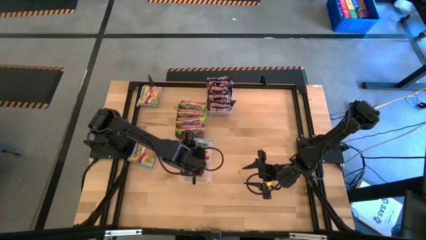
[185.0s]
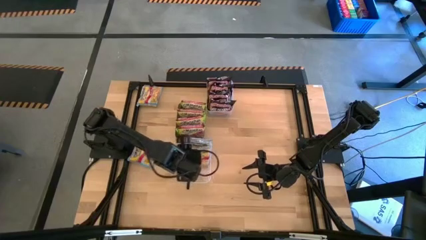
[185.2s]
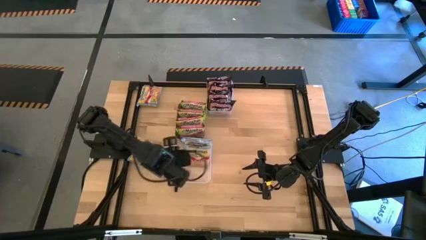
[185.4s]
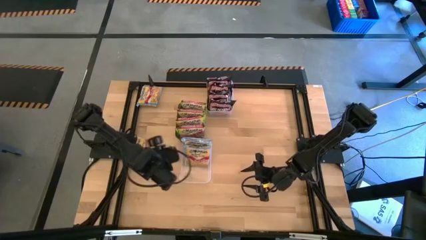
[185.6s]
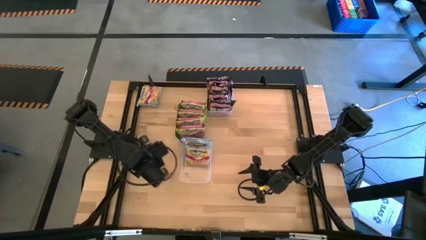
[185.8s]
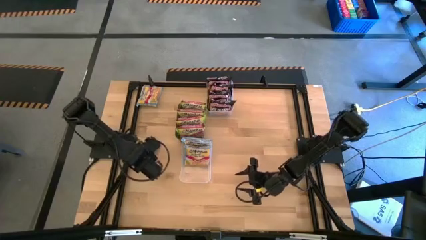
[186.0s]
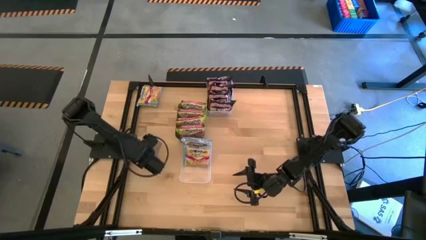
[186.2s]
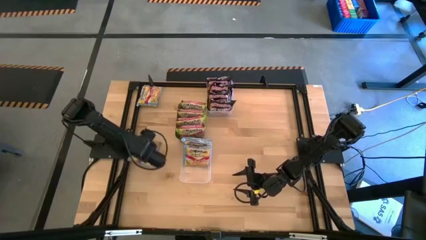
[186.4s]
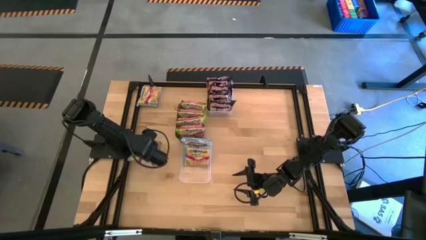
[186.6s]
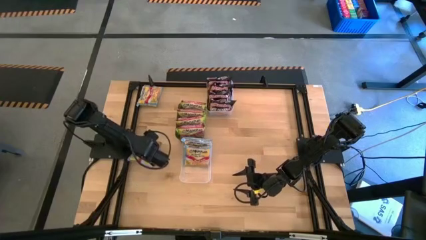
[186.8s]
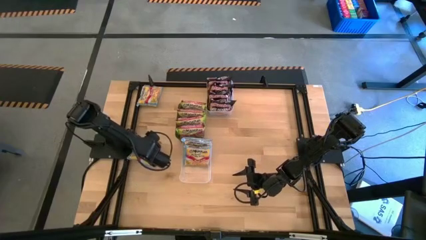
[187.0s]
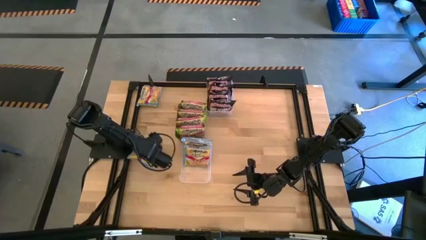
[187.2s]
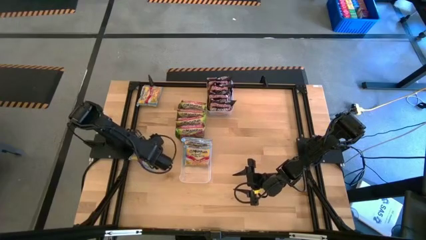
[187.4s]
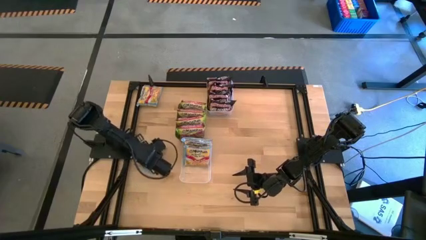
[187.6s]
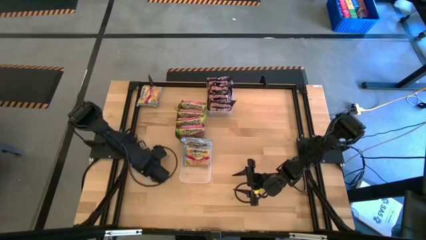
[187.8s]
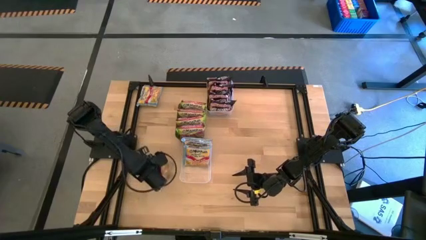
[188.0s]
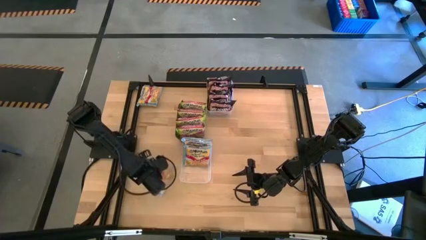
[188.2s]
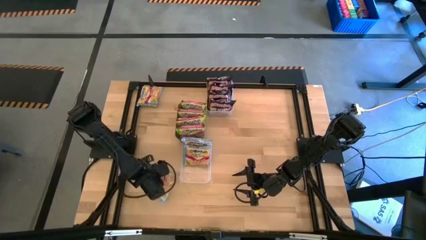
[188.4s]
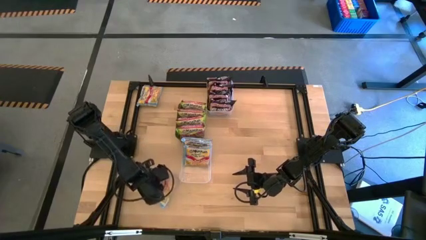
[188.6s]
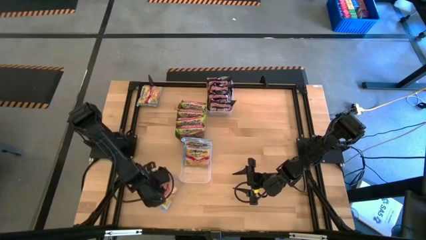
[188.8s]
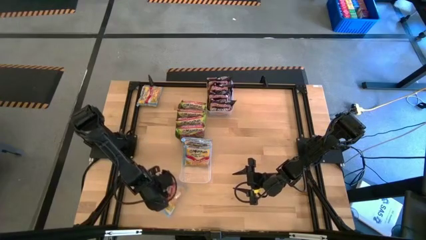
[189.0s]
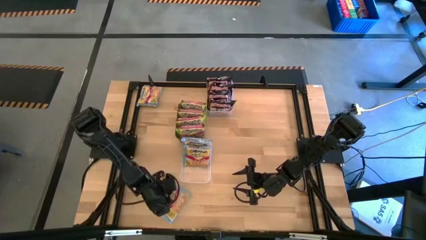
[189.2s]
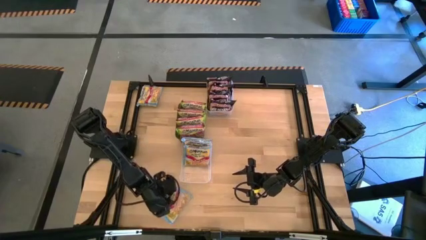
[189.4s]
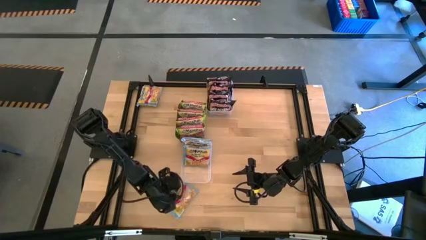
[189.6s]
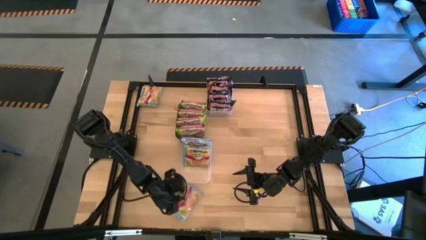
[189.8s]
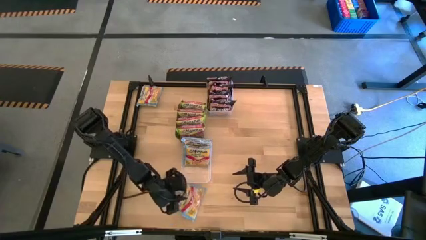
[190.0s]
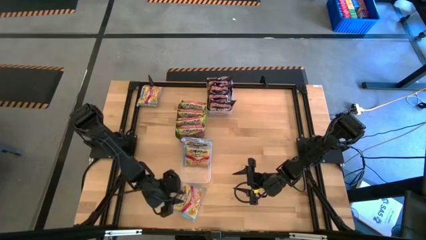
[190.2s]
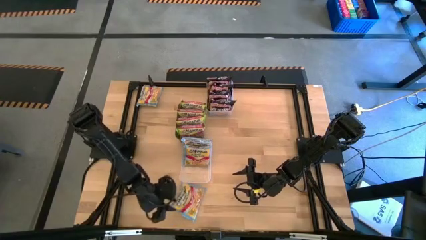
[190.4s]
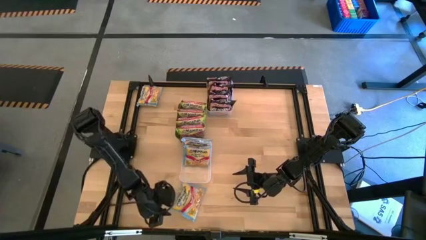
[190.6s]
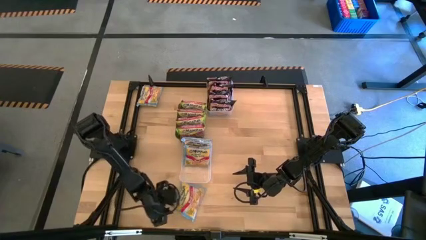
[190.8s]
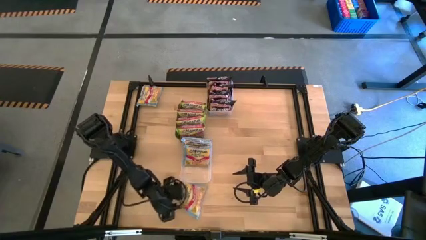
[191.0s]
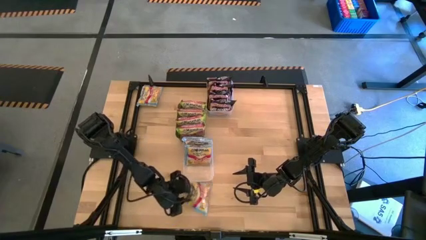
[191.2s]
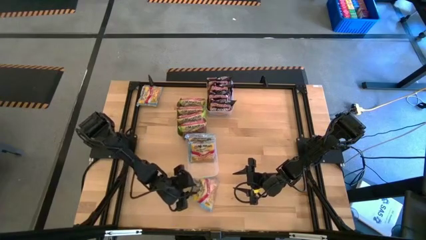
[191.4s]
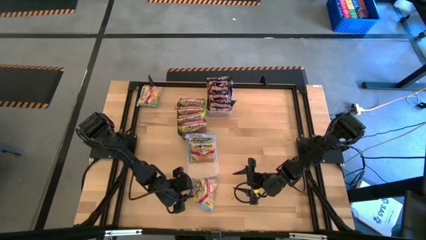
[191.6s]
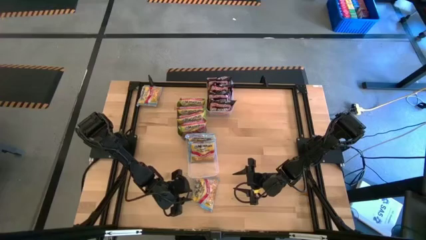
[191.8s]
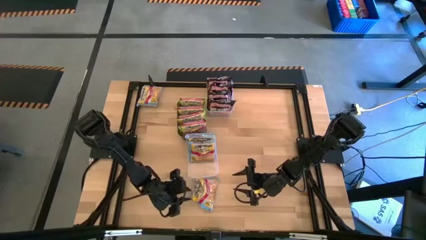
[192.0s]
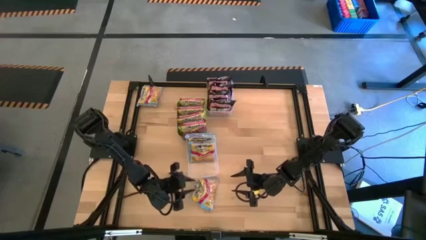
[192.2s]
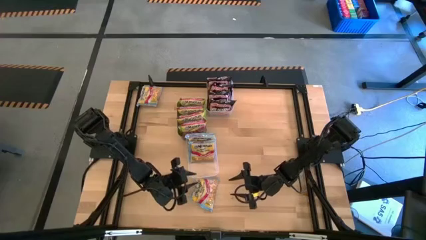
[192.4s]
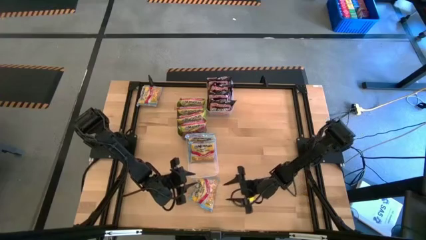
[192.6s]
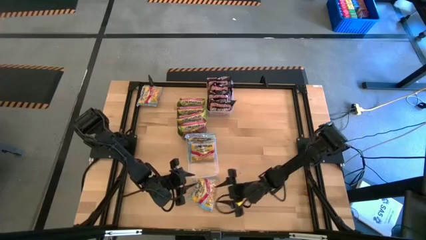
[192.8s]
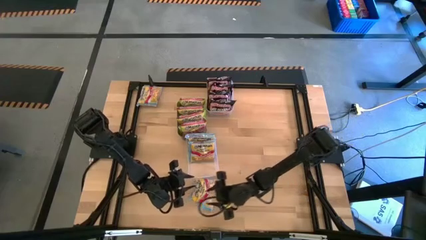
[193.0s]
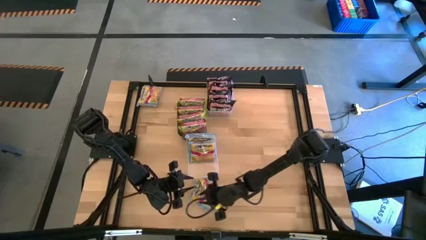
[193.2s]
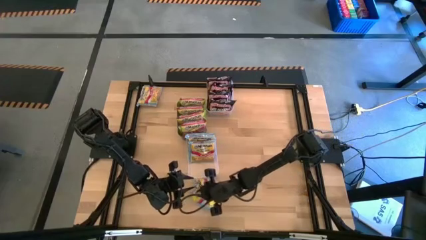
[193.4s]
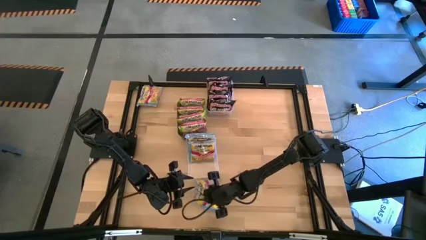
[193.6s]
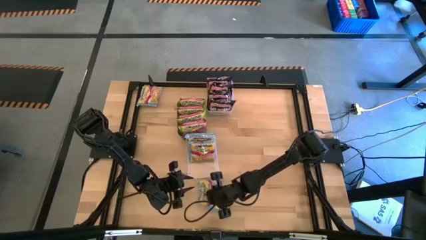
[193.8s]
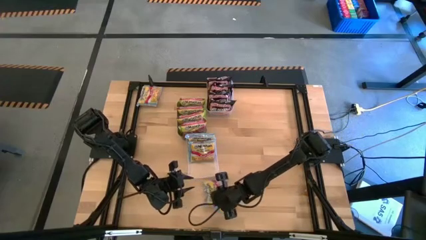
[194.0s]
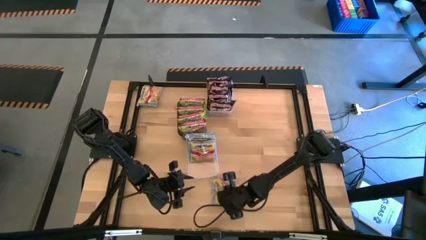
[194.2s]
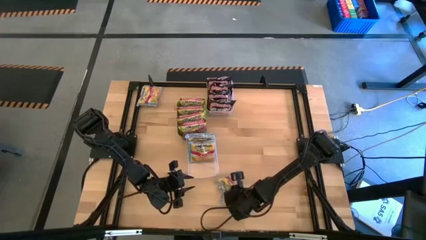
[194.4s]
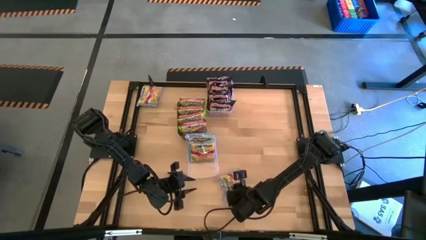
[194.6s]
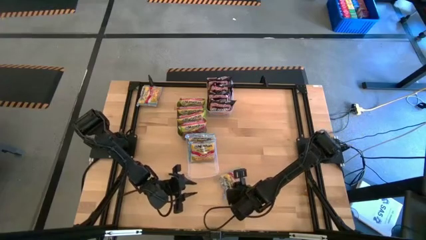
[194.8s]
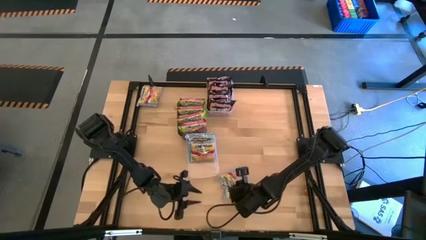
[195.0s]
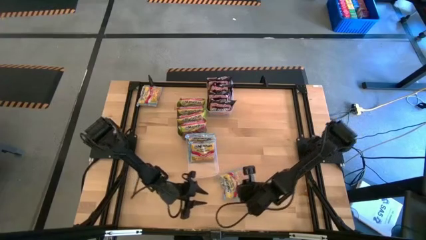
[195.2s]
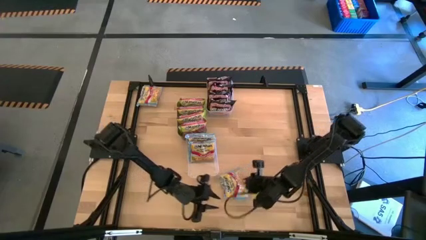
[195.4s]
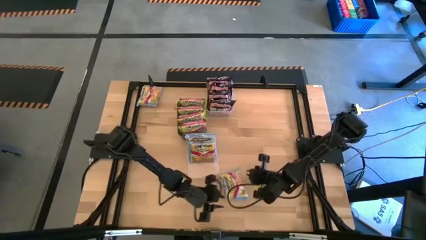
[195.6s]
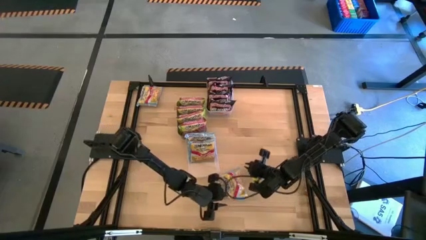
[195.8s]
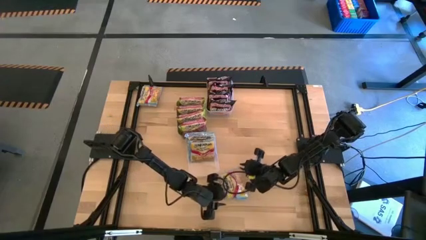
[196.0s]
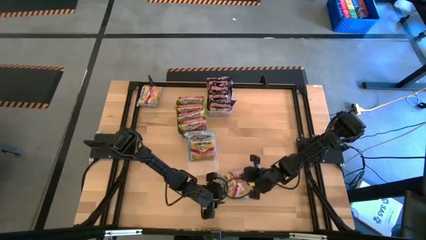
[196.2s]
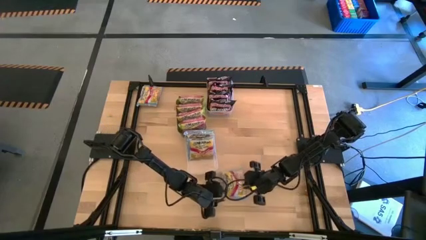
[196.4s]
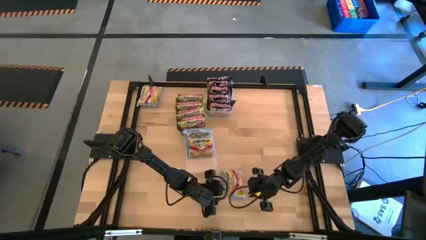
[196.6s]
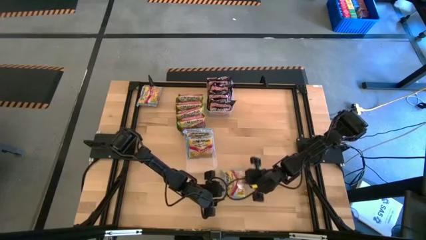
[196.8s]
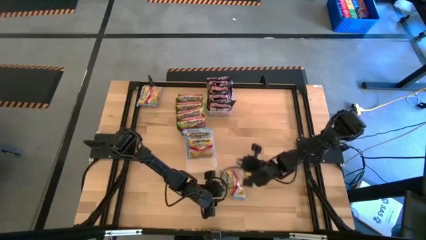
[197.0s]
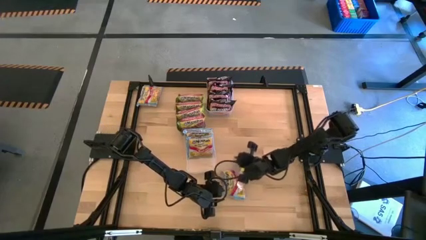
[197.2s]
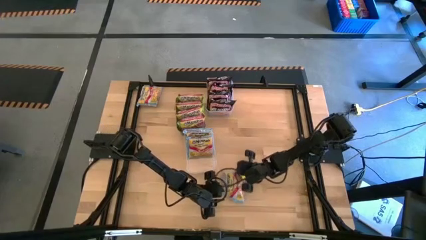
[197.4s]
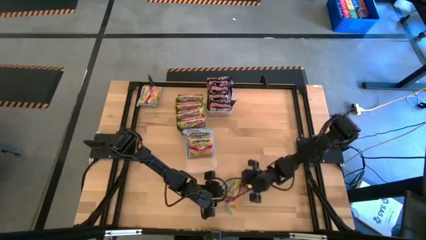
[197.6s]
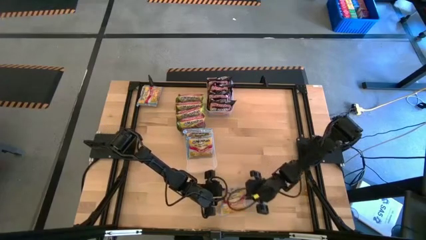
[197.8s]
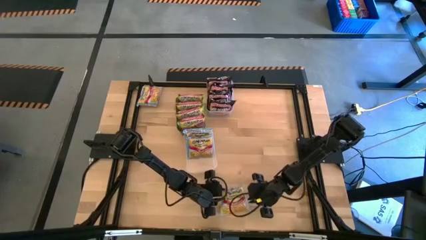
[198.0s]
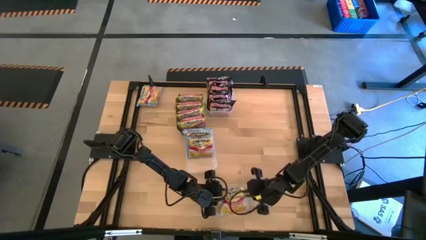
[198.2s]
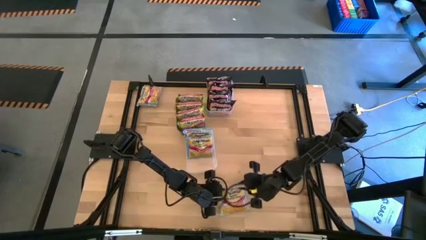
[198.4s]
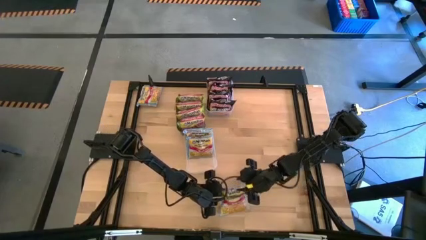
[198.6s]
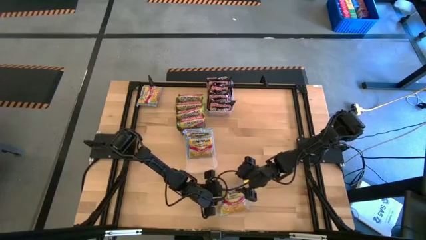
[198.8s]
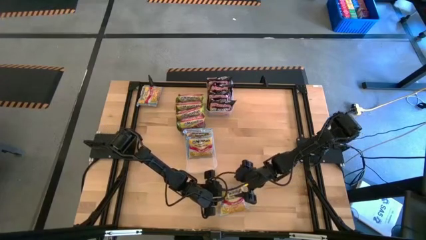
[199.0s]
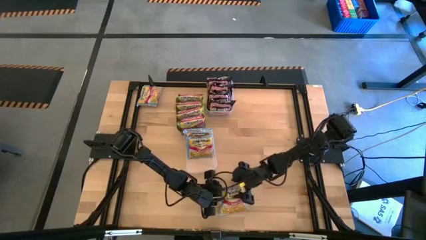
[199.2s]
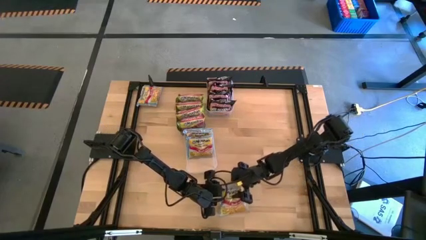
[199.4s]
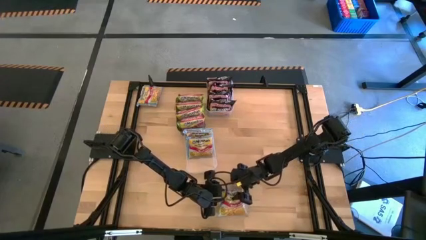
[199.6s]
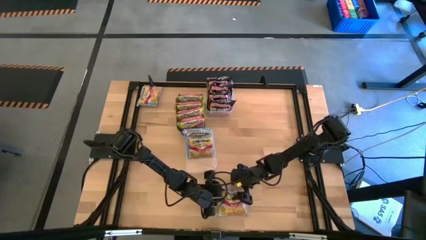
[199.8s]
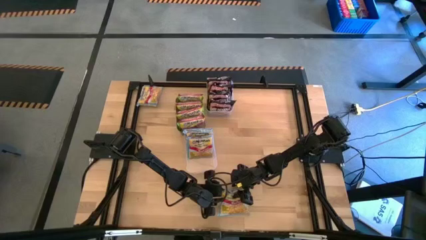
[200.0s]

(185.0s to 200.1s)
Task: Sort Maruchan noodles
Put the bottom blue noodle pack into the bottom transparent bin

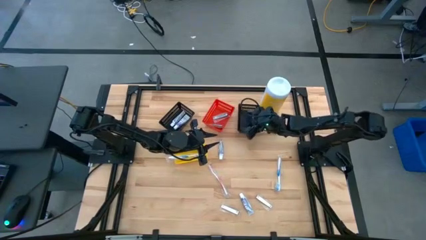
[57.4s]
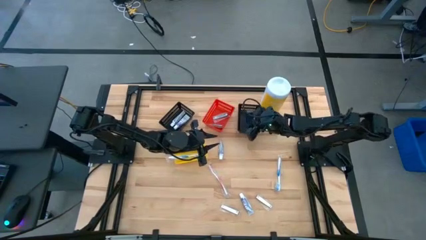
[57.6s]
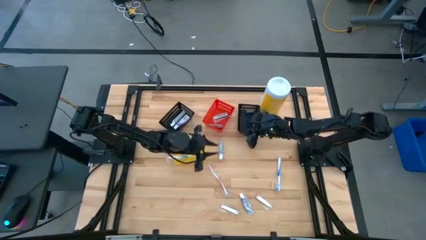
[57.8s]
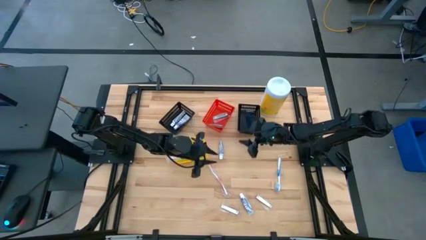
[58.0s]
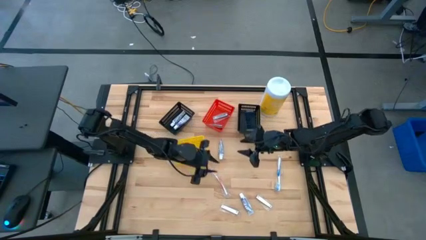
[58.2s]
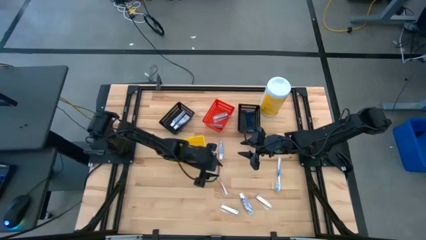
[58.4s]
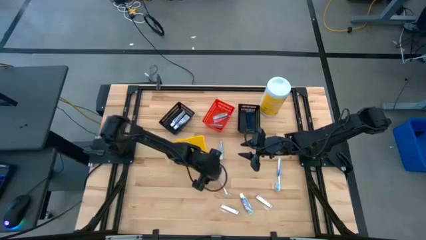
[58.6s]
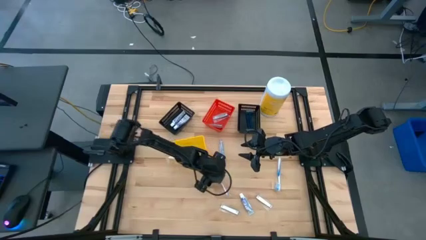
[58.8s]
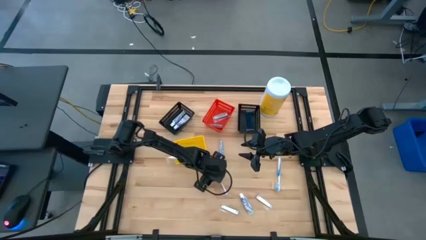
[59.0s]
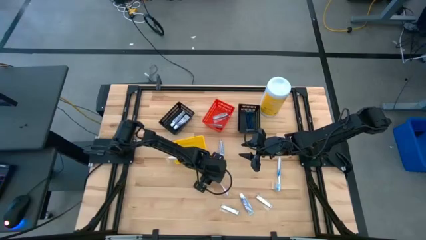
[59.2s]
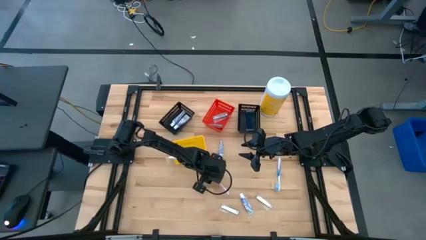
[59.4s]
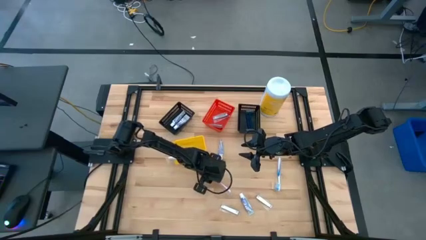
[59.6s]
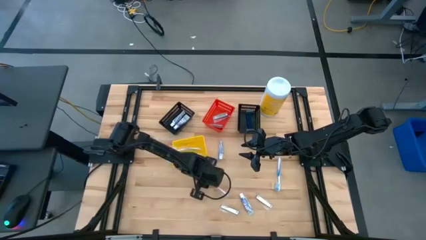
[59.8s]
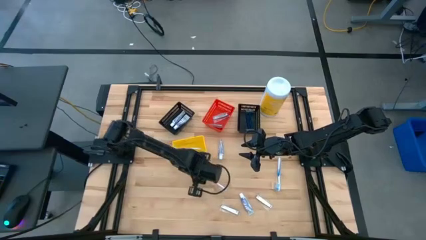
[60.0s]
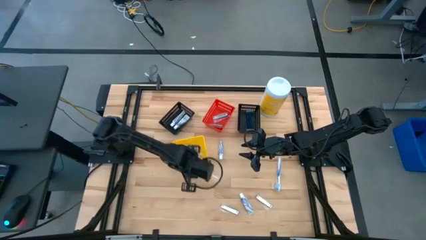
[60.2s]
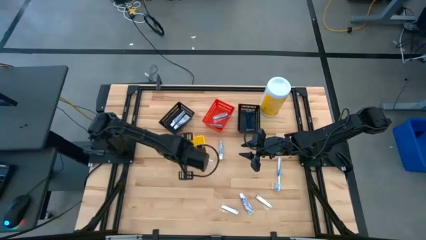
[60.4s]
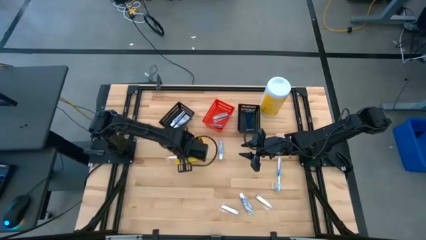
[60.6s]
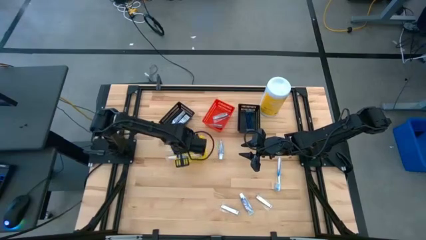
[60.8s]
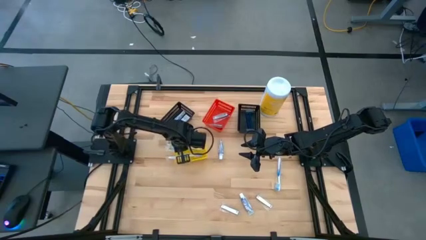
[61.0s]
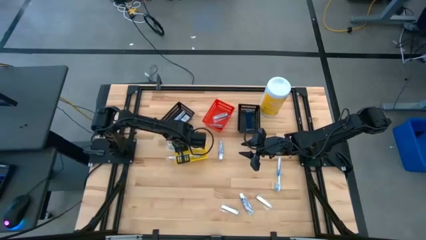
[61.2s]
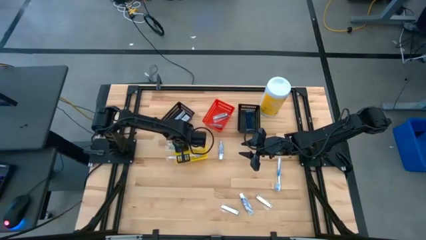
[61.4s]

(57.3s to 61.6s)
Task: Pick & Place Travel size toiletries
Put the orange toothbrush into the yellow bin
